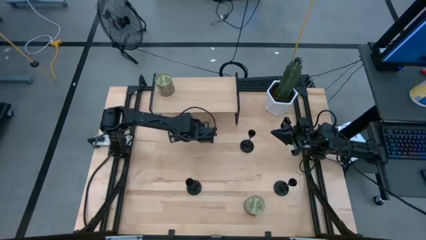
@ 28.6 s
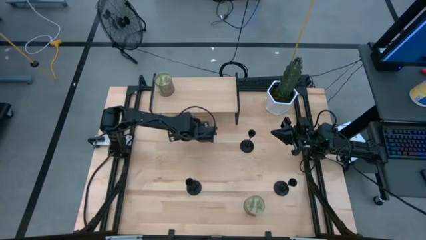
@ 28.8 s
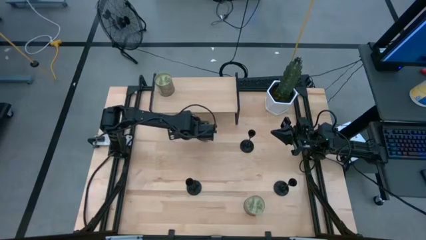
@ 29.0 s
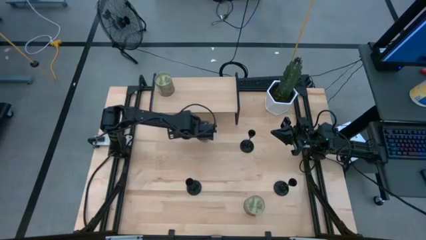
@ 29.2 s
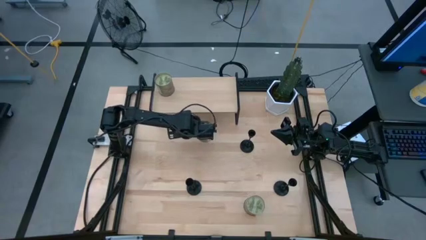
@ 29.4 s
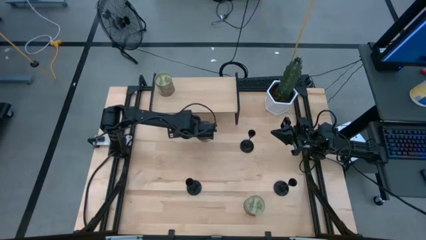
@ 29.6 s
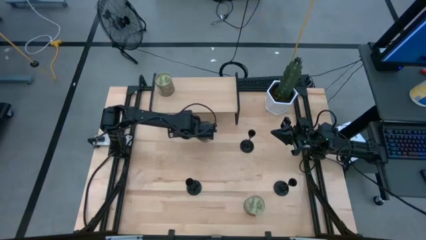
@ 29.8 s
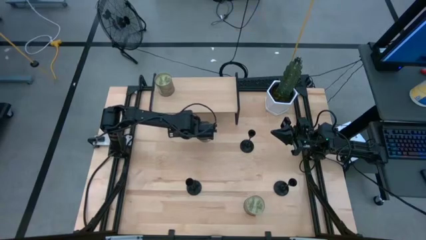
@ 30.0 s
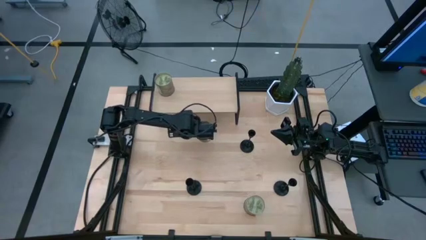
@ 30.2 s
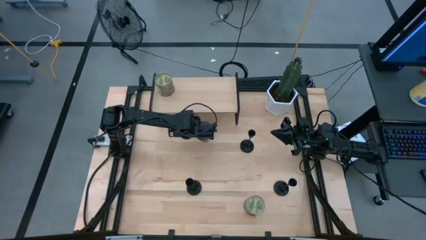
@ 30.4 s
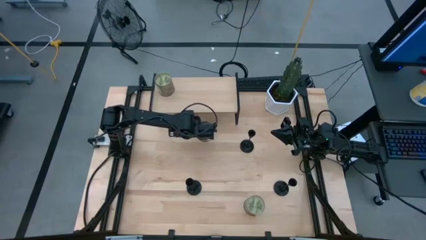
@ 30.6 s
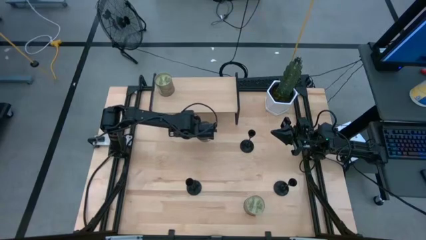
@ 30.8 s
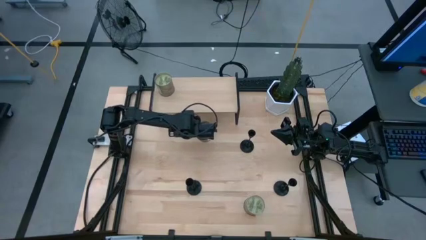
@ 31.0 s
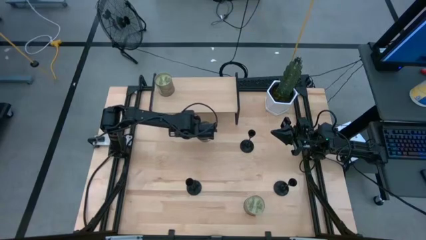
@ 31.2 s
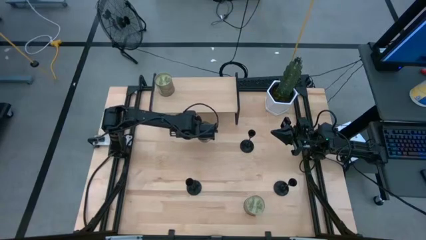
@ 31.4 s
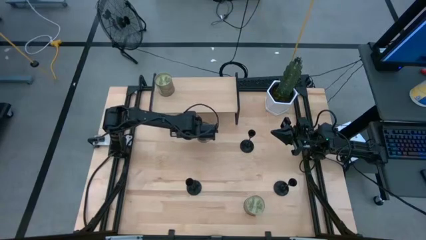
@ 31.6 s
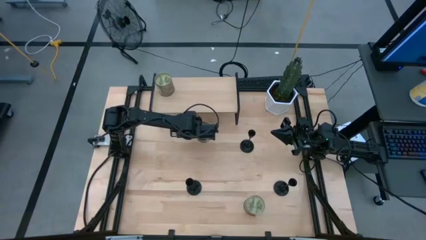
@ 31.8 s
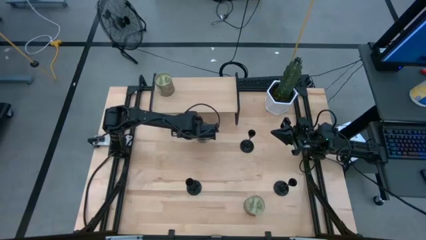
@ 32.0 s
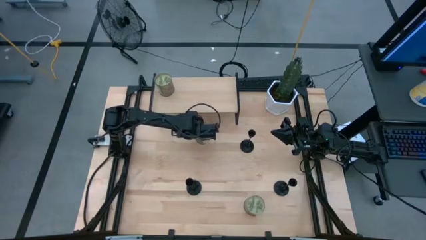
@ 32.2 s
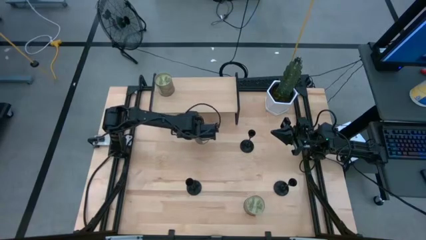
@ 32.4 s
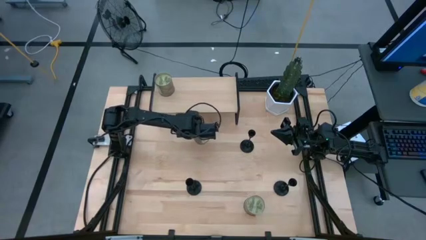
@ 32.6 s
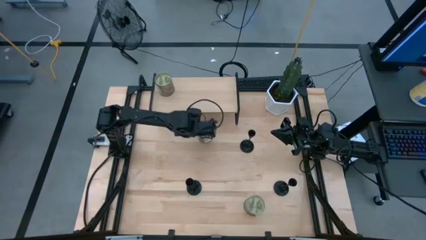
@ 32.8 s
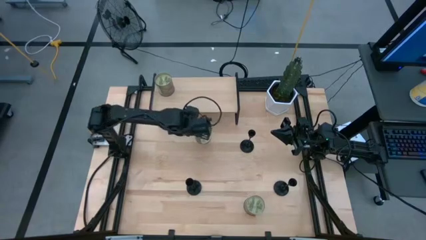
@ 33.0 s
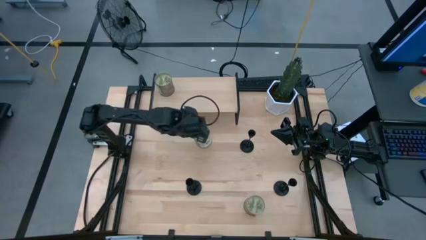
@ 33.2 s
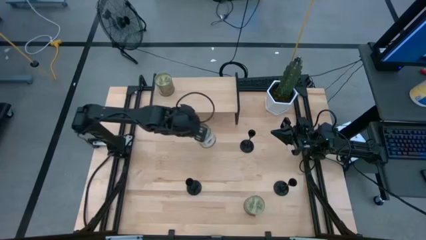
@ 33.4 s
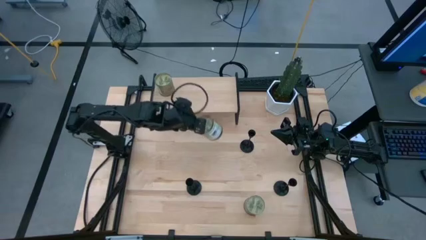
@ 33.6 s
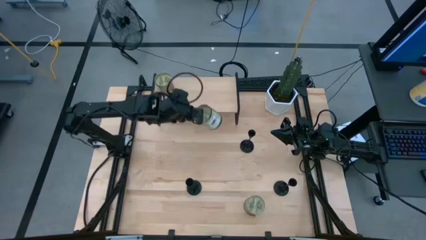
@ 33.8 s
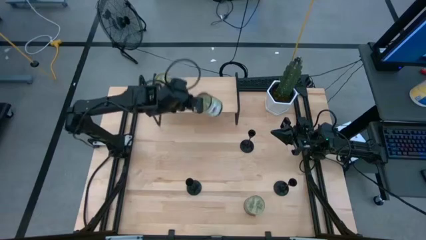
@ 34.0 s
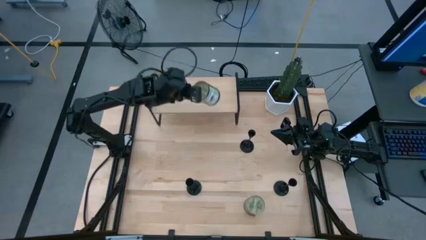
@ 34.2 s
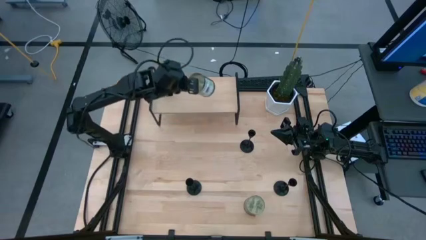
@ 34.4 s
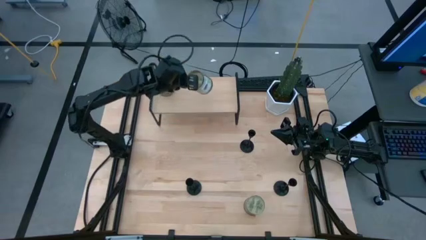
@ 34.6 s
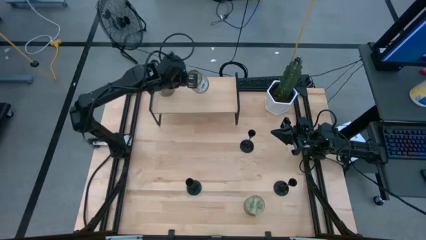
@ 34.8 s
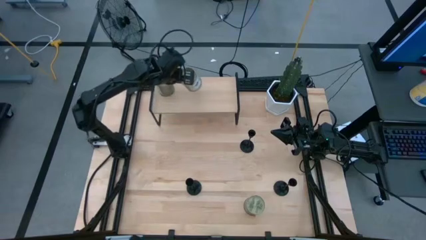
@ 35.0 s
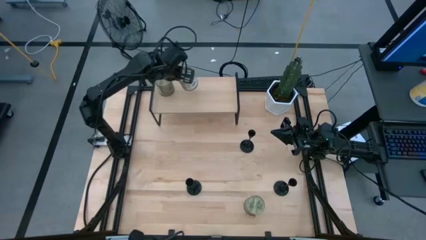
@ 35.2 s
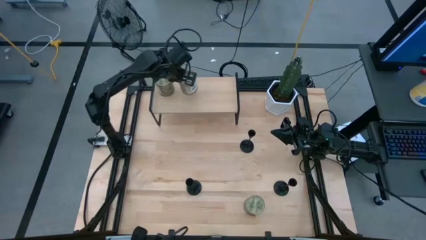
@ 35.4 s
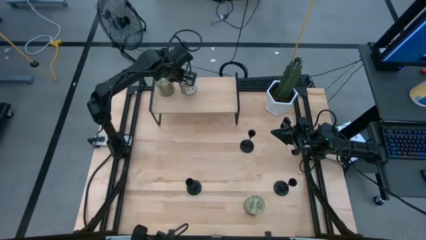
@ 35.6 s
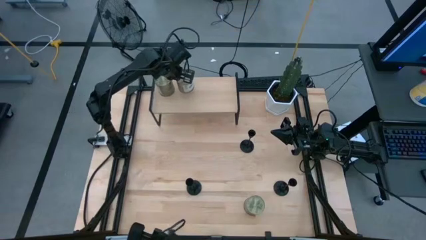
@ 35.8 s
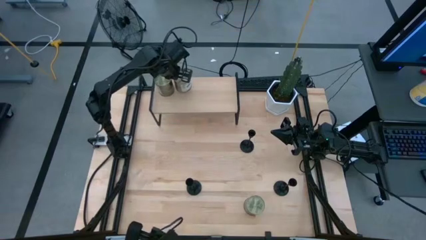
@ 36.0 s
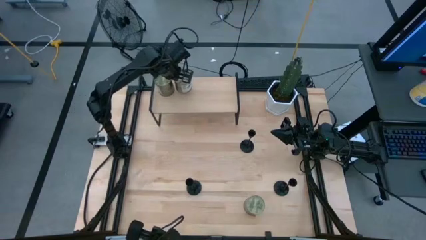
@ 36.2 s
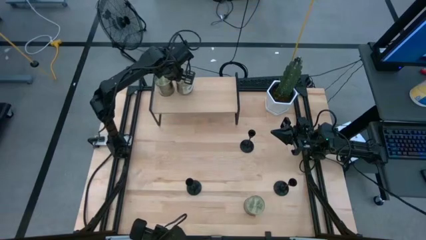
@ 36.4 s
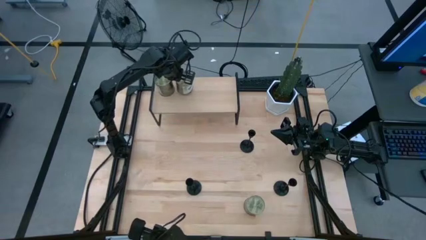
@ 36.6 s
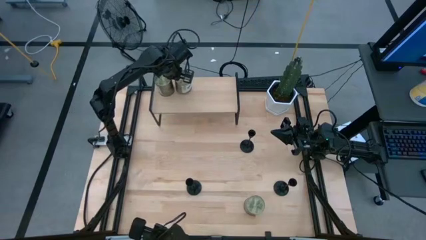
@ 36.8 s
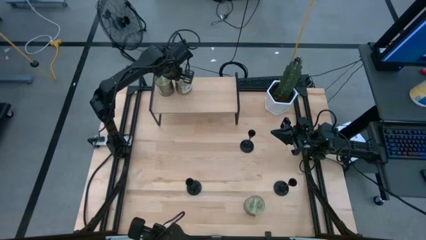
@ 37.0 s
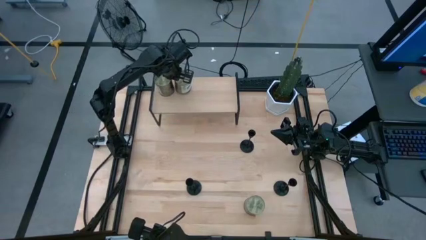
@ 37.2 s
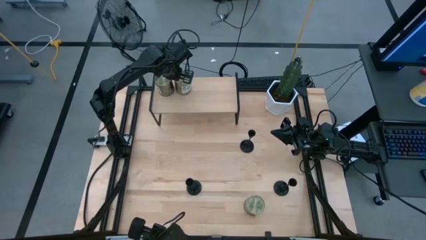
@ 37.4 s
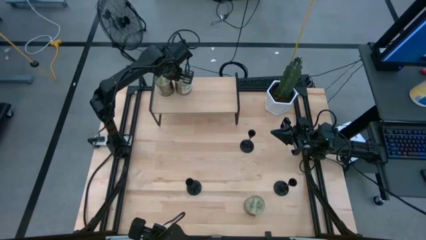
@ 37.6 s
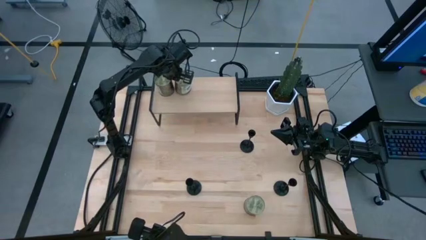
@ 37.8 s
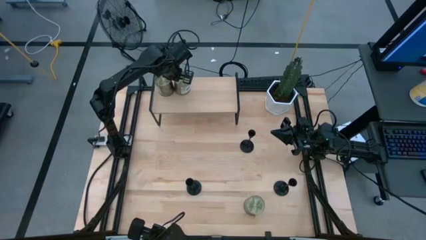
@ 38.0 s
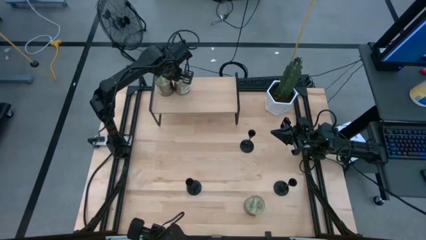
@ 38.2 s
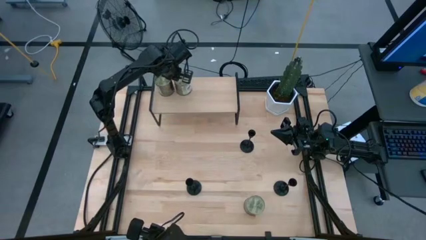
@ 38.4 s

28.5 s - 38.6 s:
Task: Pick & Place candle stick holders
Put the top green scented candle on the shelf

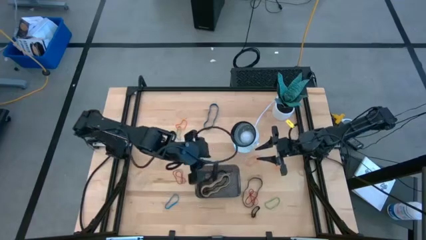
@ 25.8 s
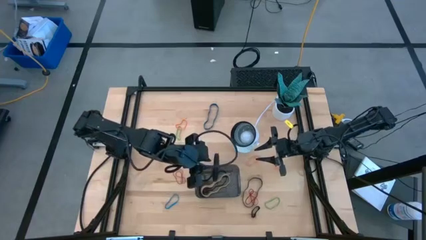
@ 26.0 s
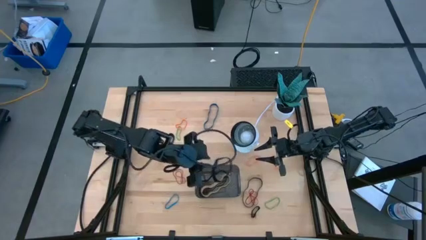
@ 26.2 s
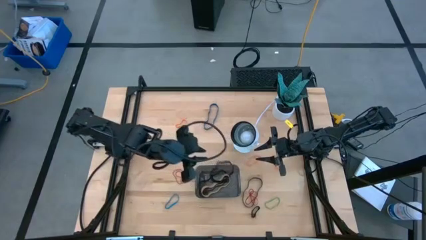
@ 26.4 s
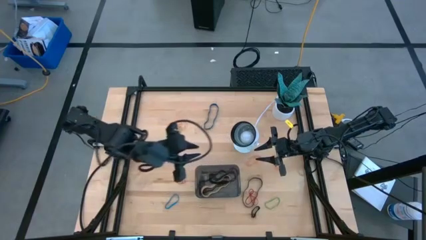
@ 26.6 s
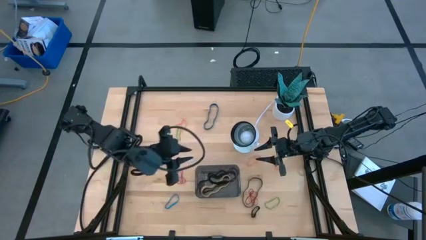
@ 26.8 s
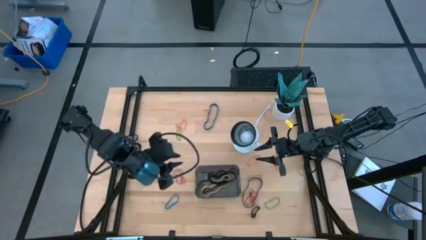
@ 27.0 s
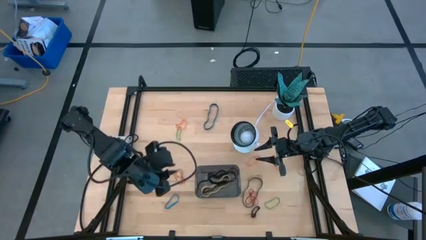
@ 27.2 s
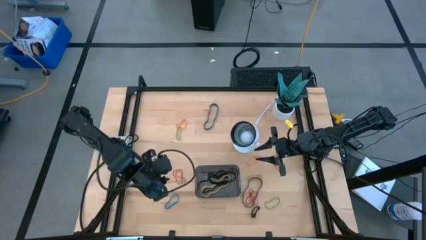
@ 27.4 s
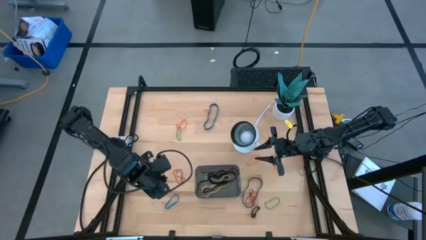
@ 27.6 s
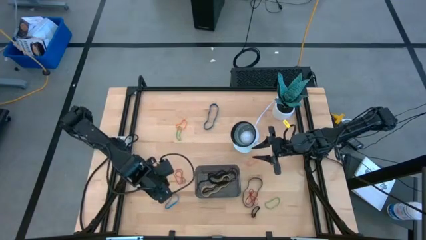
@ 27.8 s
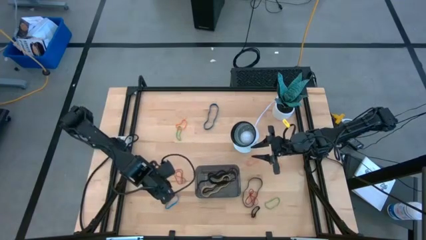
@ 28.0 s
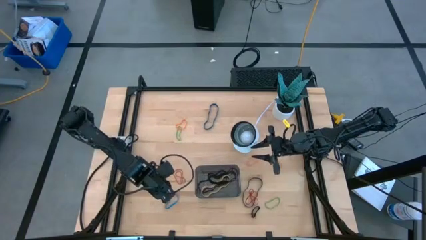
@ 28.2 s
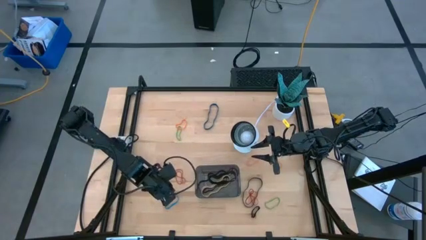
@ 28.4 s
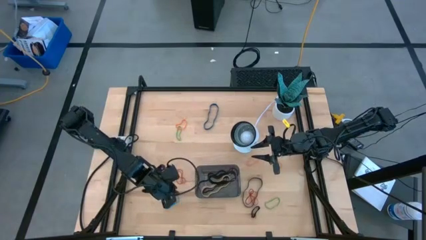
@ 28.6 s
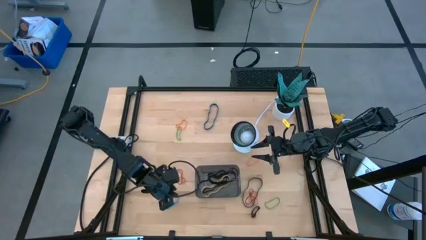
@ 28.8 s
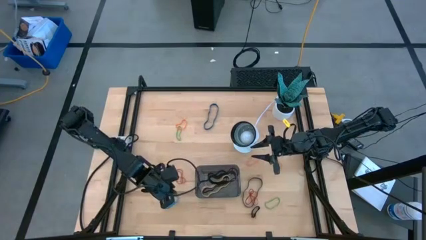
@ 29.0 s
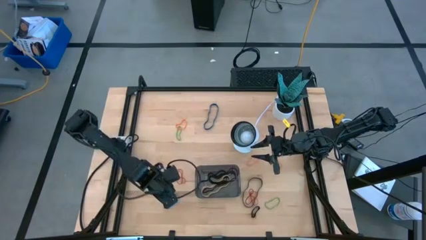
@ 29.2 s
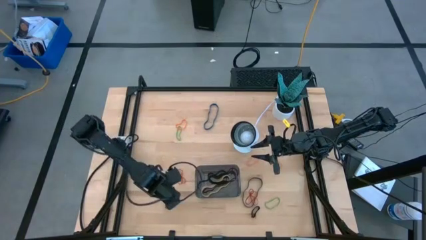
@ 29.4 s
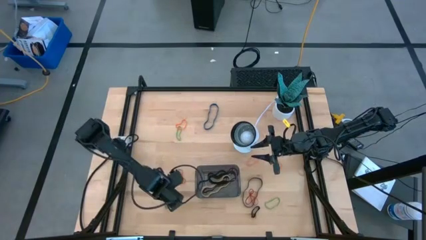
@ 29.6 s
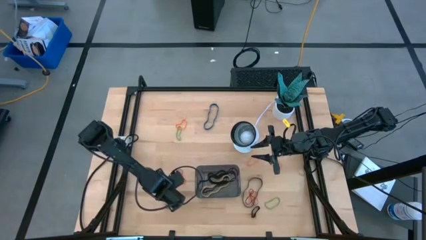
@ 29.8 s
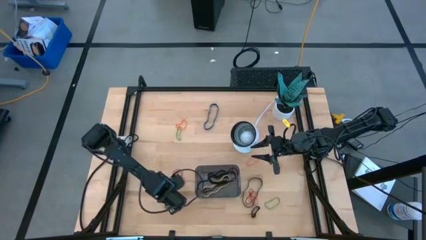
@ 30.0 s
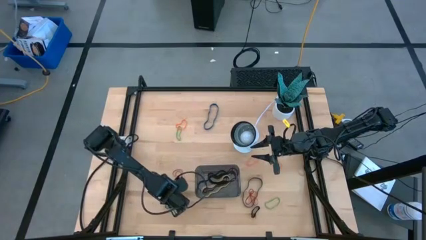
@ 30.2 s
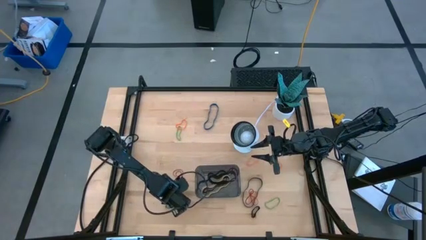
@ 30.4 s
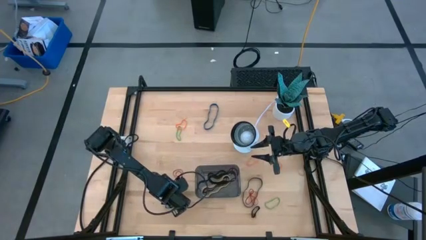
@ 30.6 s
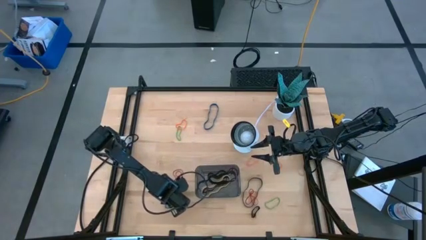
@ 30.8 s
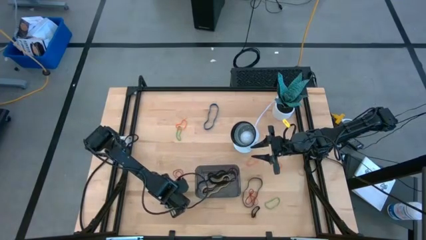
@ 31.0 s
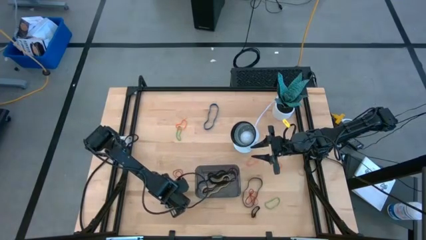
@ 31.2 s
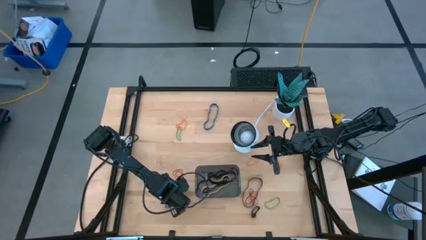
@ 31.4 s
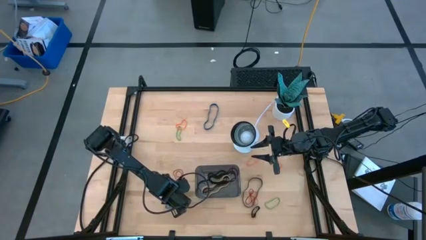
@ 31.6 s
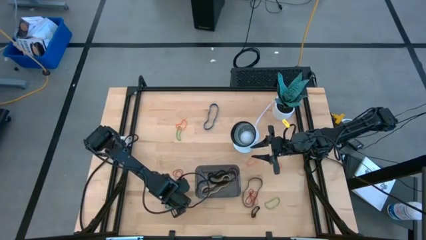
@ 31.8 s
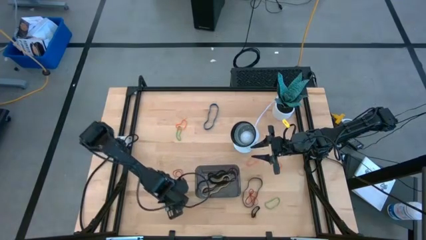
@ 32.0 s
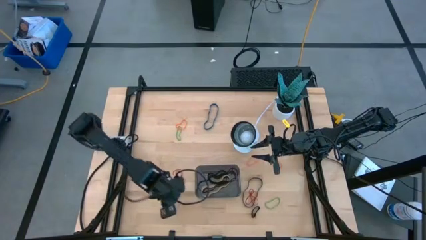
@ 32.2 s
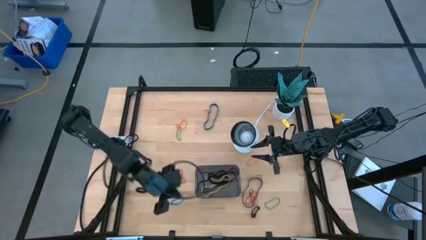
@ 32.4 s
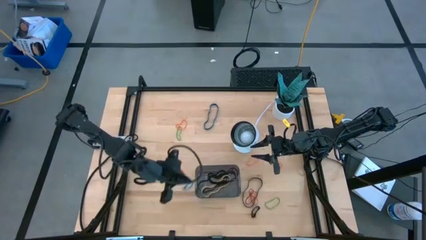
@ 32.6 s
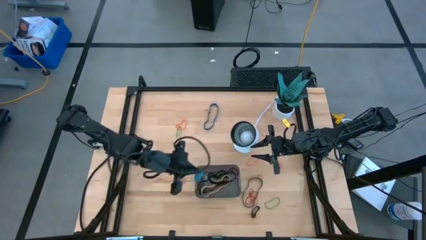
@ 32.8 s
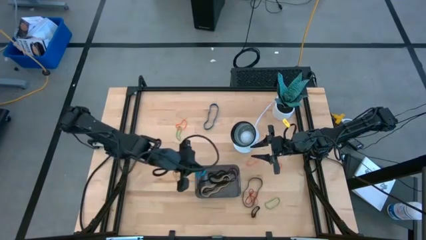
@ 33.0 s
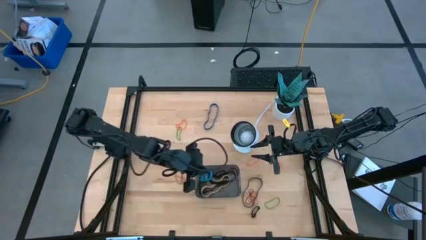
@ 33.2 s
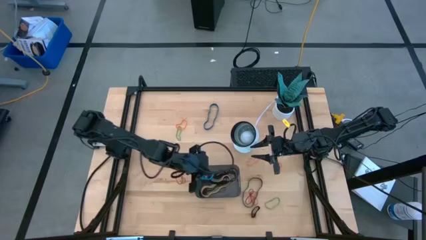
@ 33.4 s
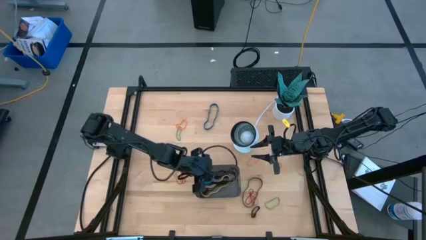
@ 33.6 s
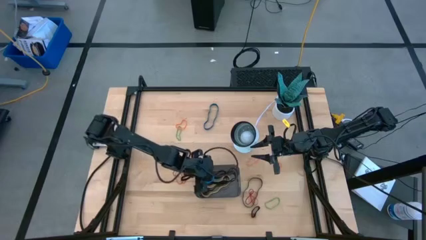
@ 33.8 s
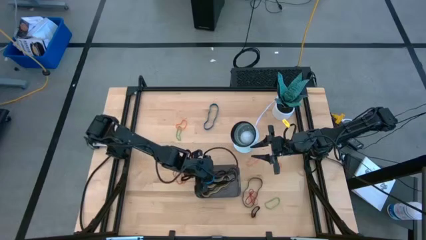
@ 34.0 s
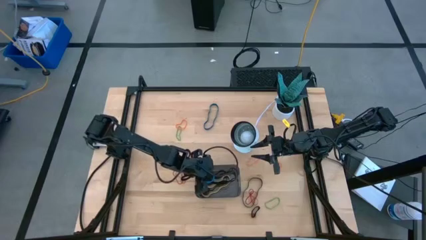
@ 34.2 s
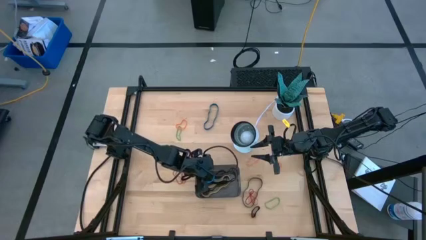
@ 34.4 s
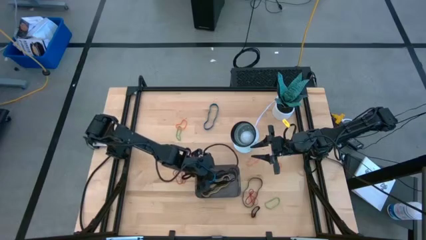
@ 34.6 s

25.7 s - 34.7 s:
Task: Pick and place rubber bands into bin
Put the small blue rubber band into the black bin
